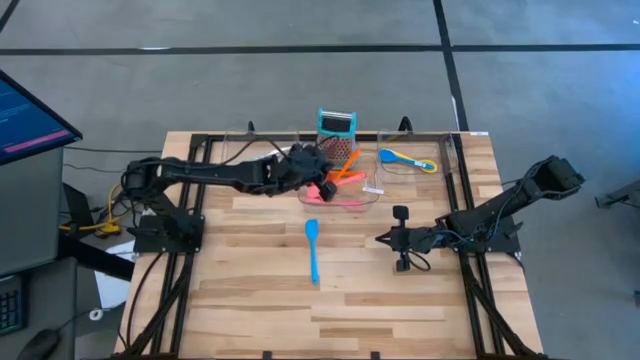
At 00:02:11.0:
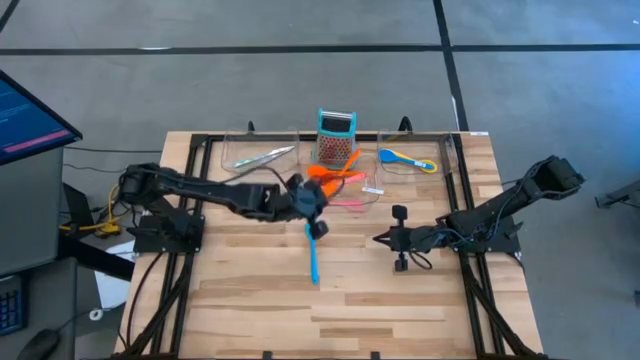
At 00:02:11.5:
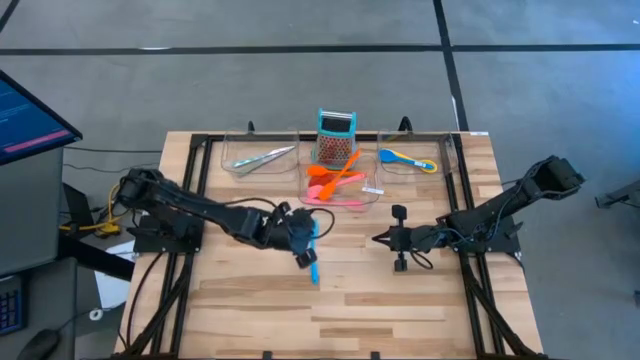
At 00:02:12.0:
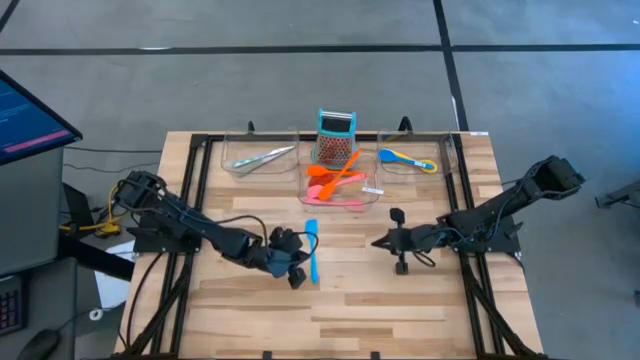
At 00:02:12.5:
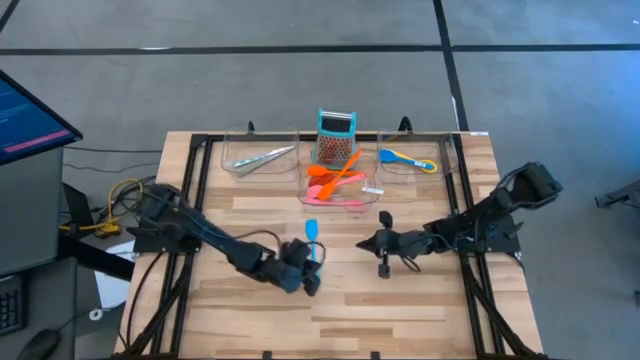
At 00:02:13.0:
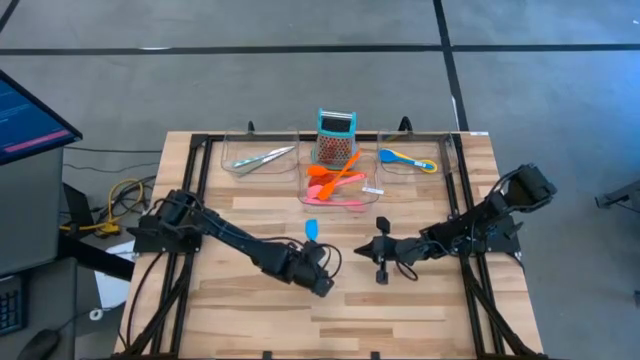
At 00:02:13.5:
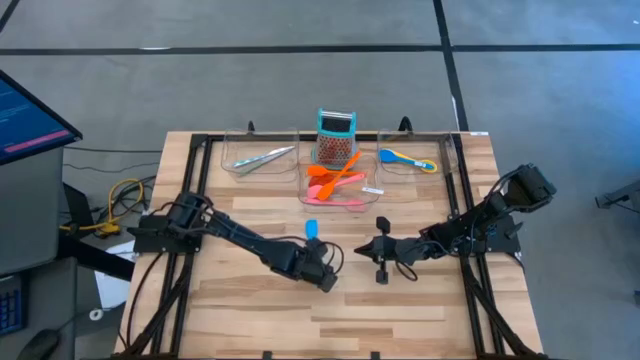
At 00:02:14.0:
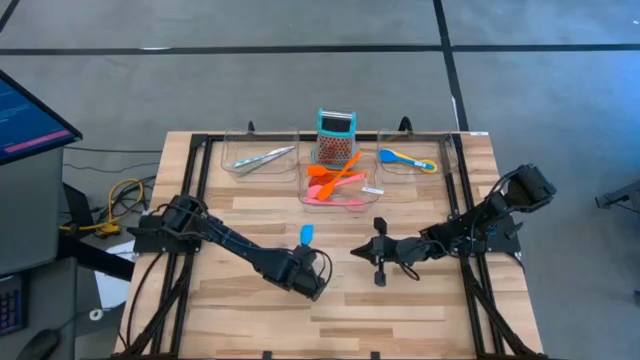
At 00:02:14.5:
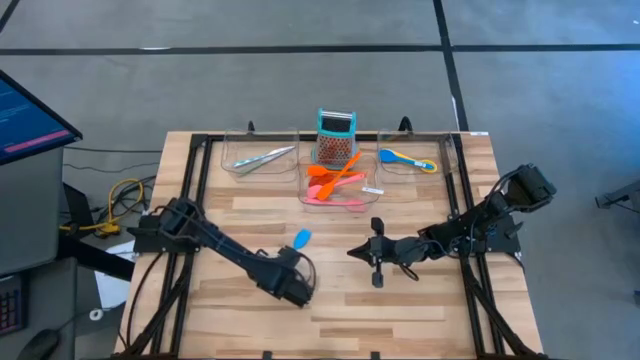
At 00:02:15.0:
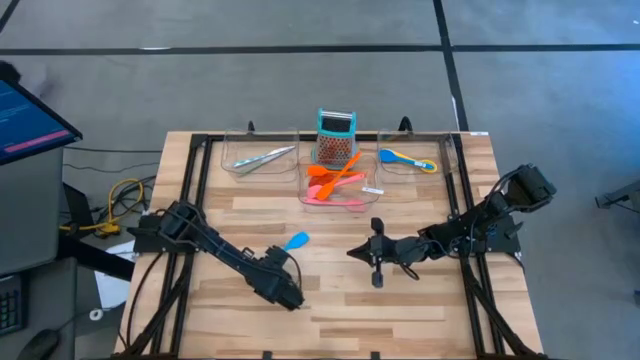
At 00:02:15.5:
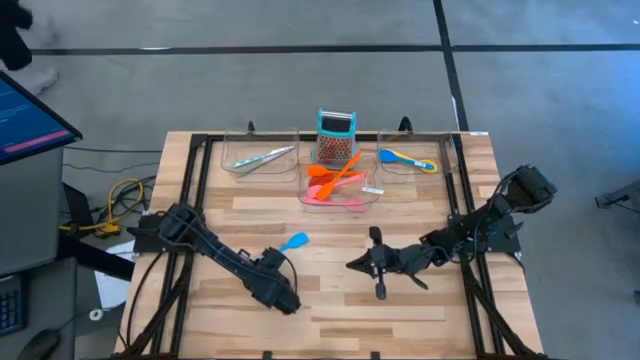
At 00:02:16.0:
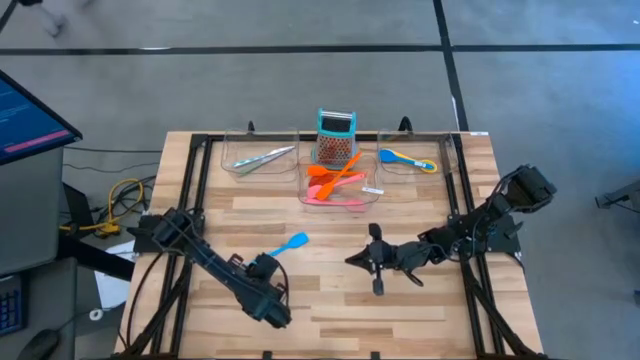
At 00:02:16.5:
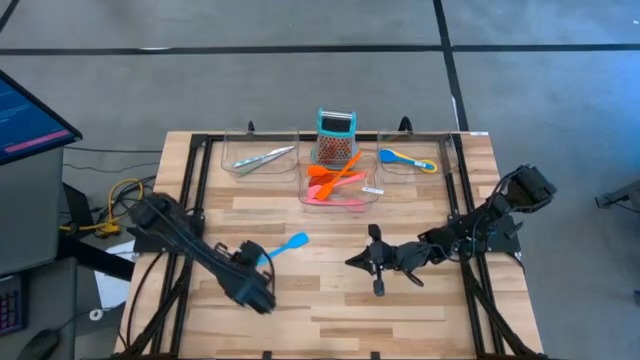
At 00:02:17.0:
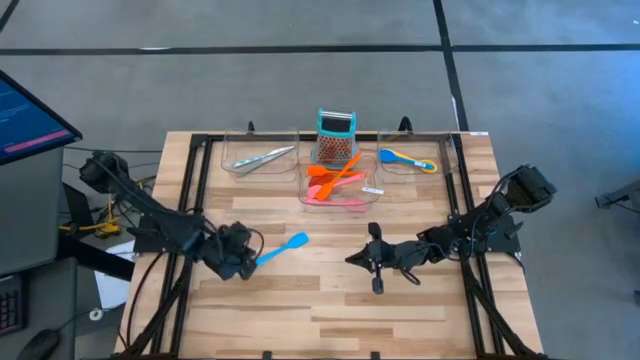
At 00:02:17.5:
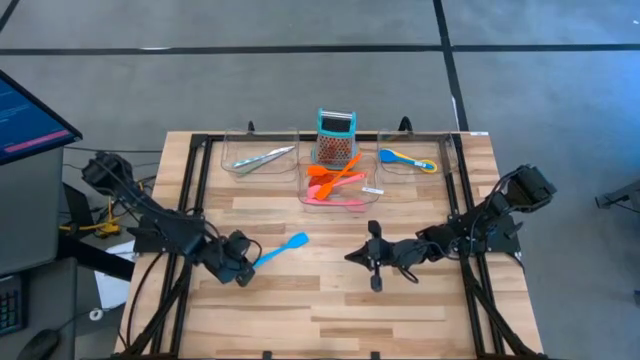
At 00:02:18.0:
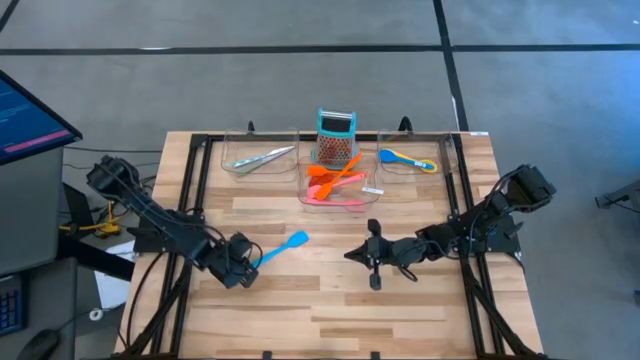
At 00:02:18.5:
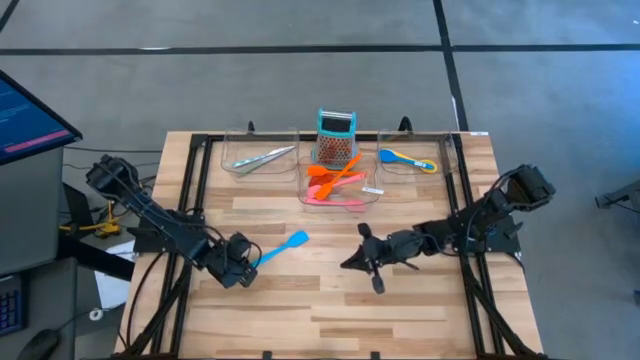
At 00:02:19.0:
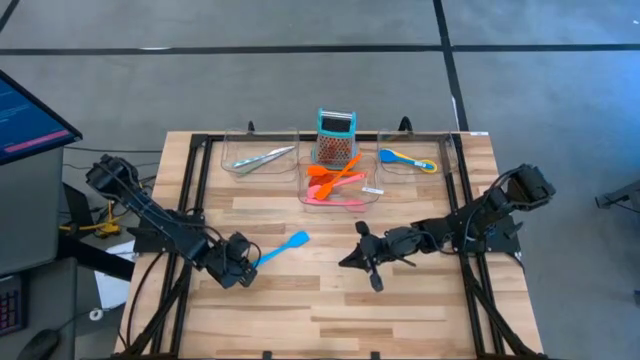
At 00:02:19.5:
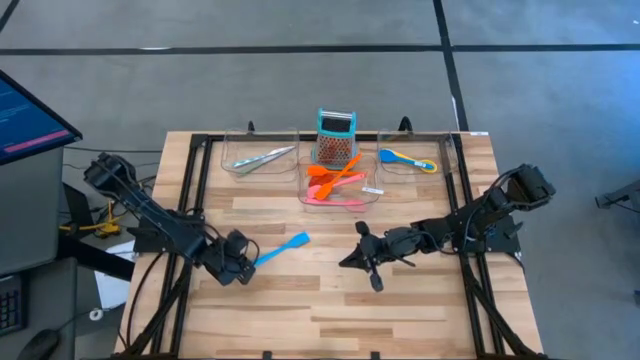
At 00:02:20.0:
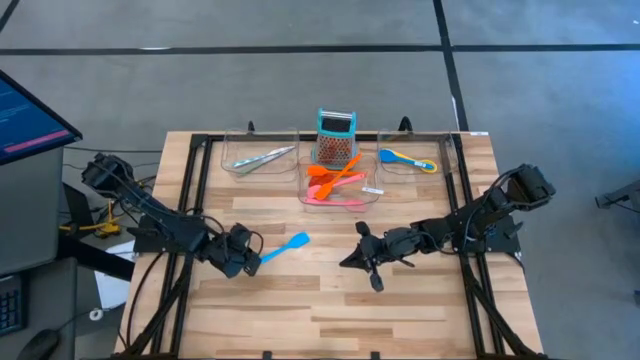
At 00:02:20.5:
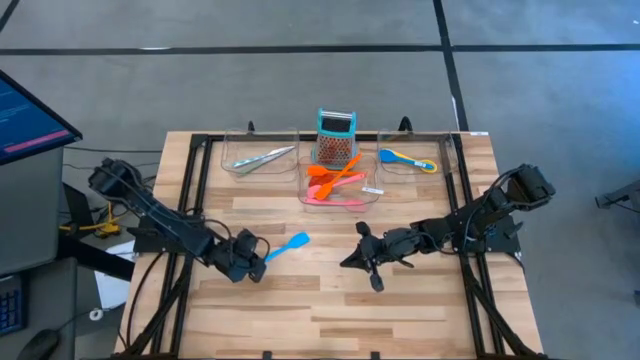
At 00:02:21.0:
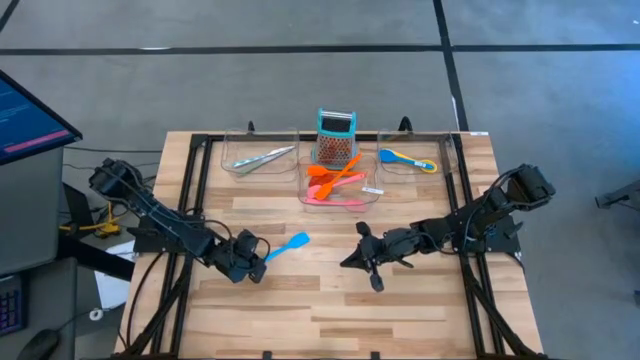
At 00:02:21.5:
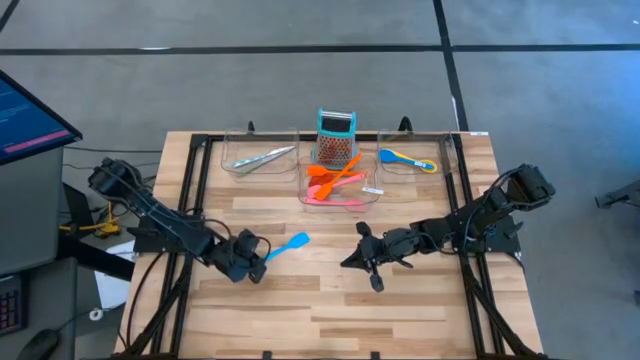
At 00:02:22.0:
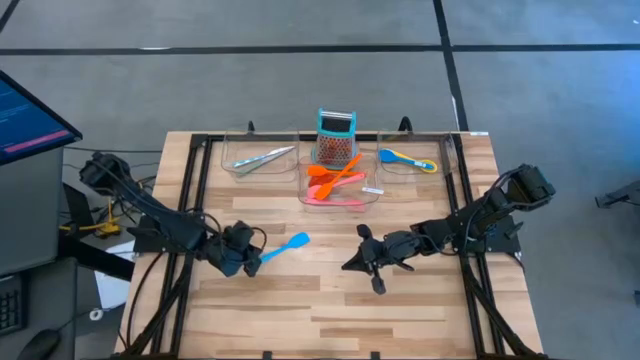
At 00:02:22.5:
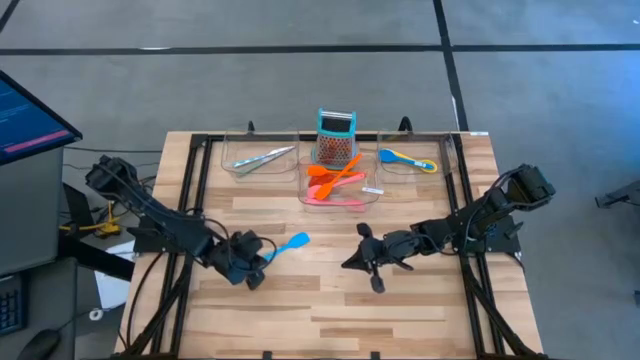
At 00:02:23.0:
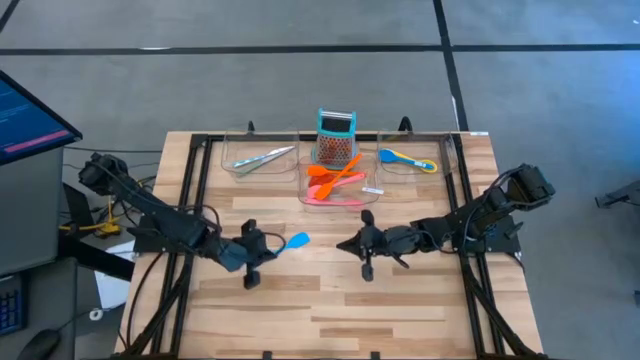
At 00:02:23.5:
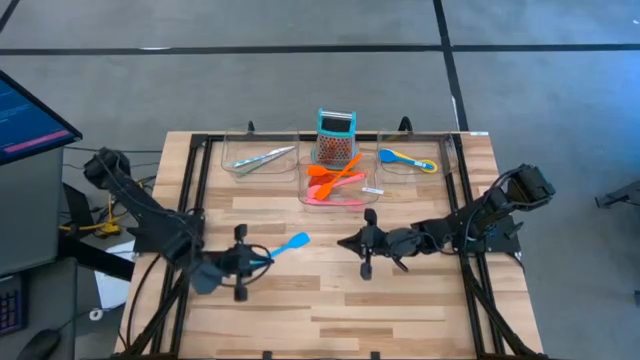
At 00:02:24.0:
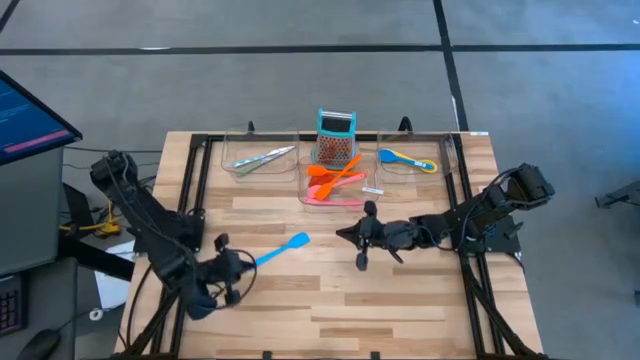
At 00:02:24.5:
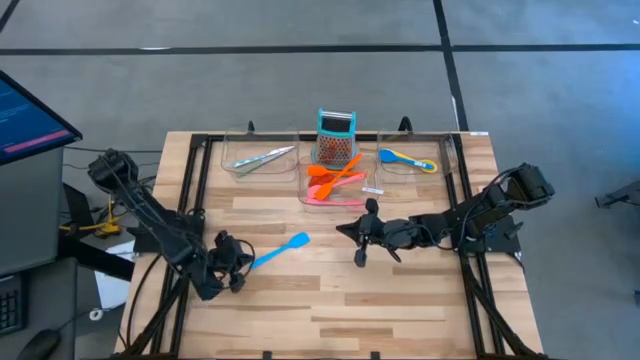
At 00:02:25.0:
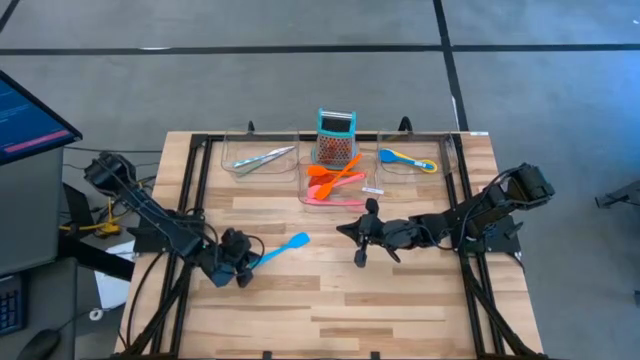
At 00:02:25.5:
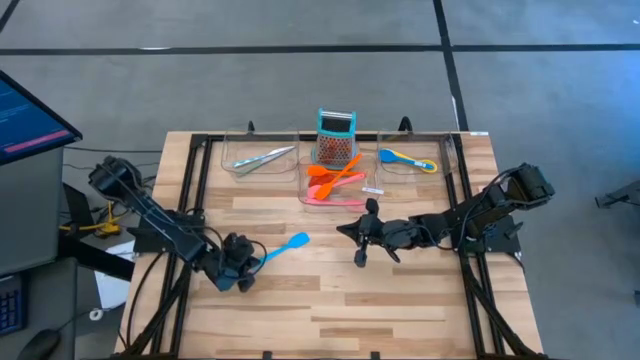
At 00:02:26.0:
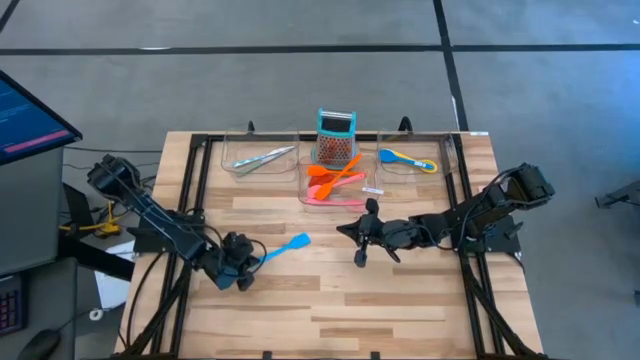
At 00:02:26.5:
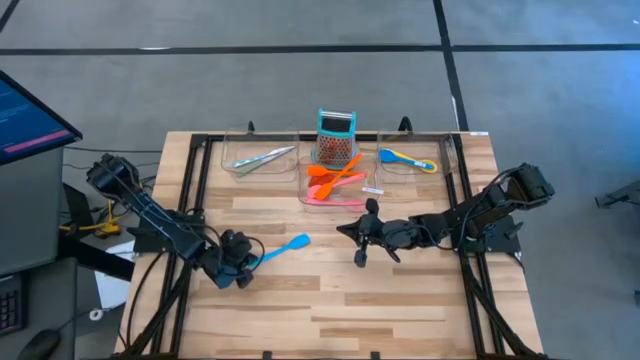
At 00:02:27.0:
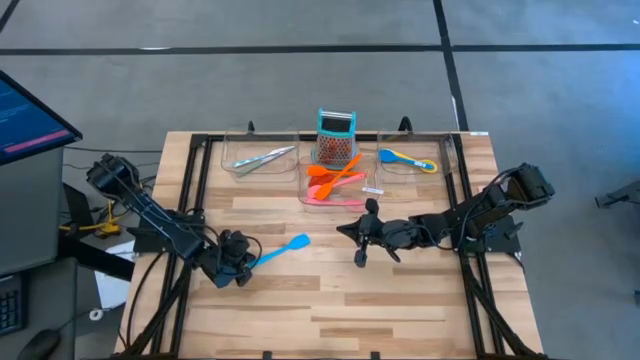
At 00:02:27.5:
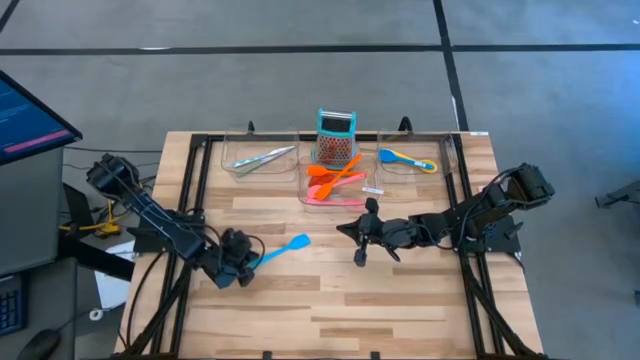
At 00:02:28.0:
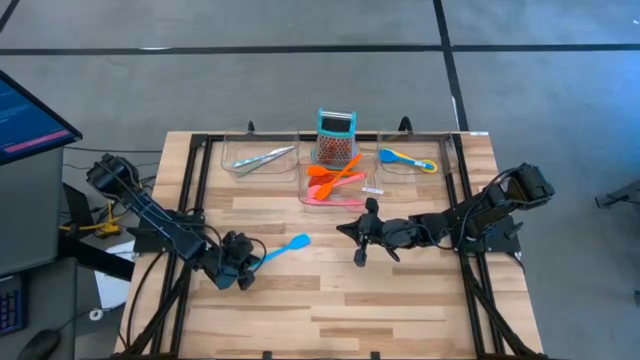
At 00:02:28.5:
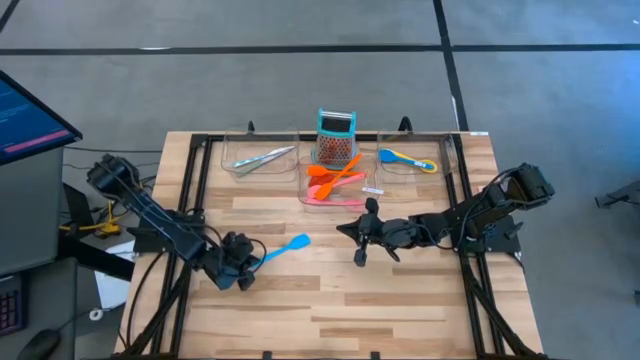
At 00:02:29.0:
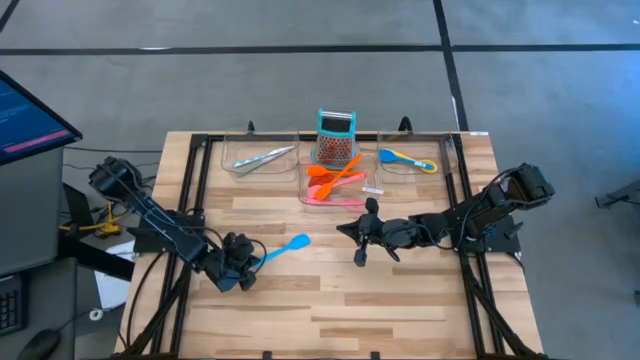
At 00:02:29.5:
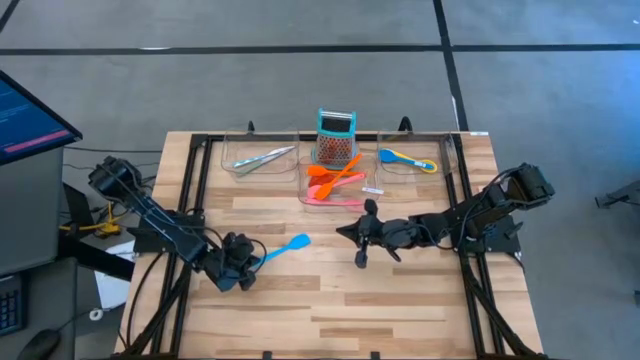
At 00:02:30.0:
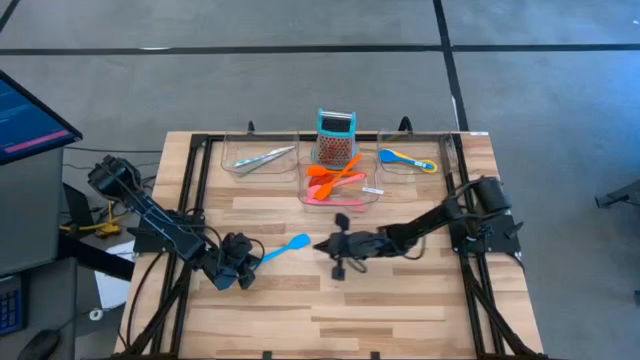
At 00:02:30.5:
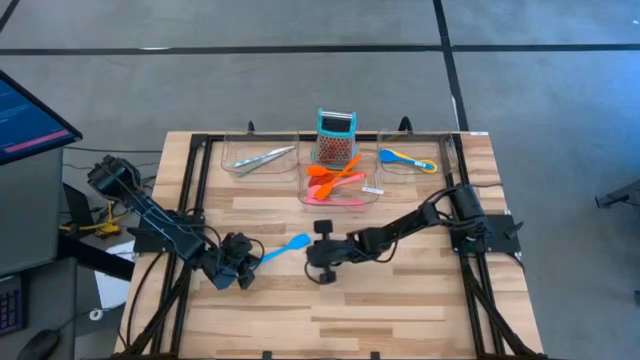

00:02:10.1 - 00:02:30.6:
Task: Pick & Place Kitchen Items
Put the blue spatula into the middle transparent bin
